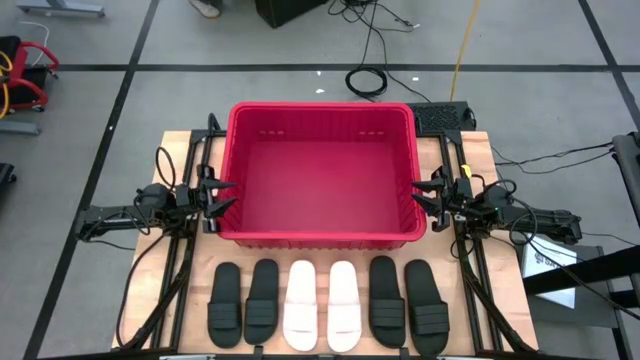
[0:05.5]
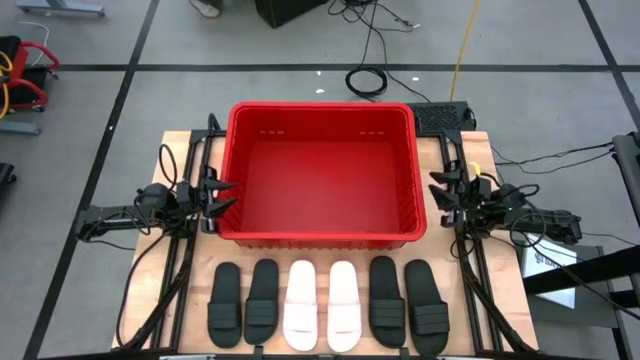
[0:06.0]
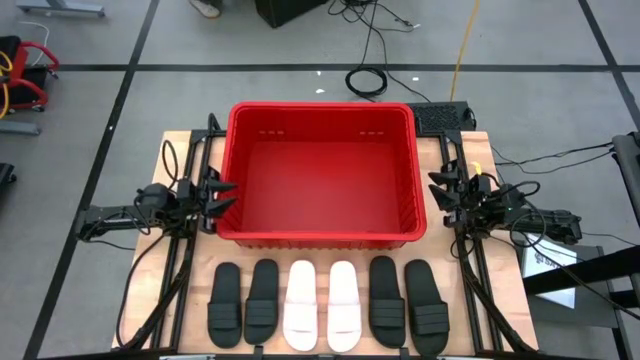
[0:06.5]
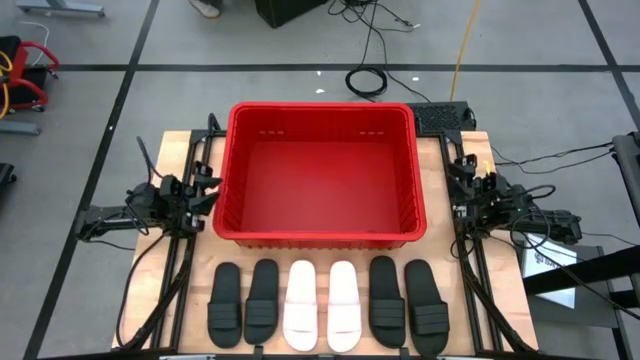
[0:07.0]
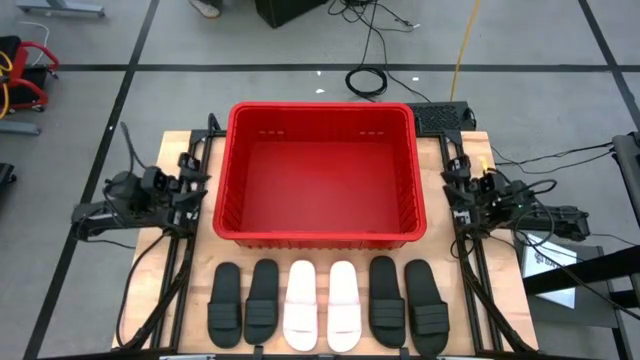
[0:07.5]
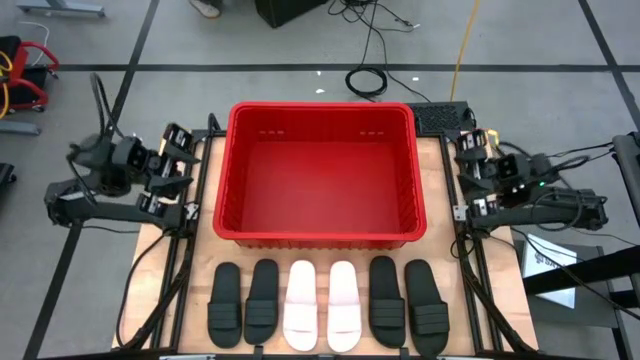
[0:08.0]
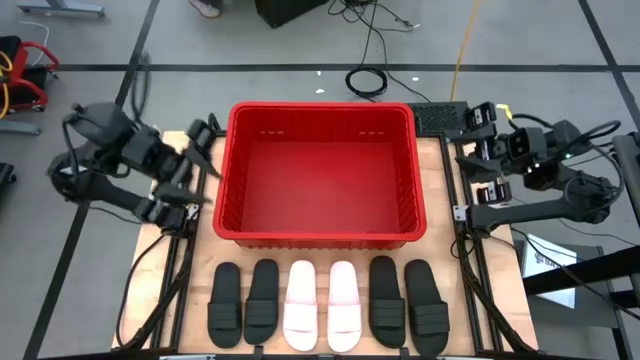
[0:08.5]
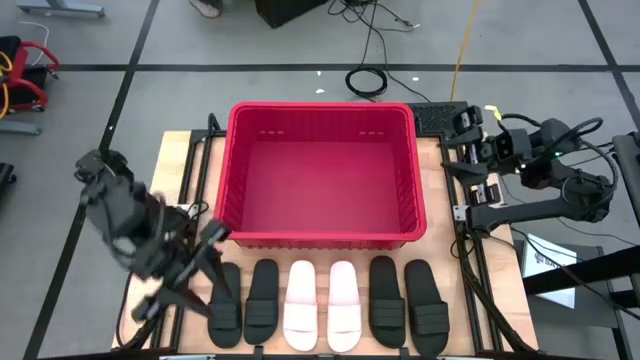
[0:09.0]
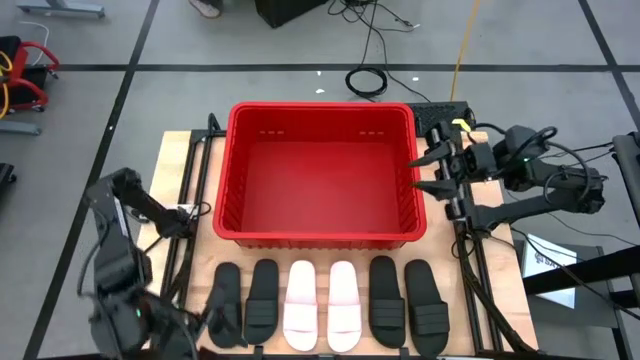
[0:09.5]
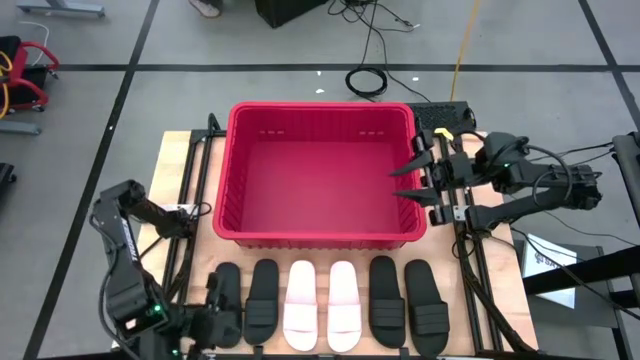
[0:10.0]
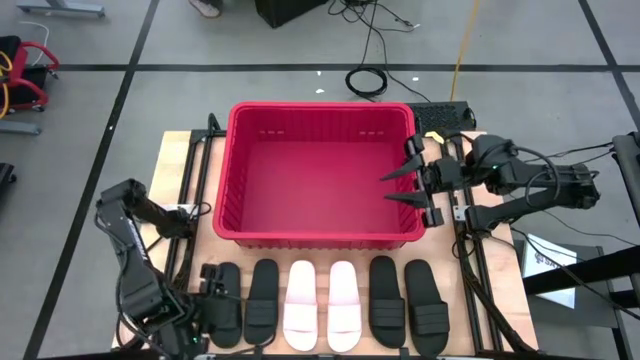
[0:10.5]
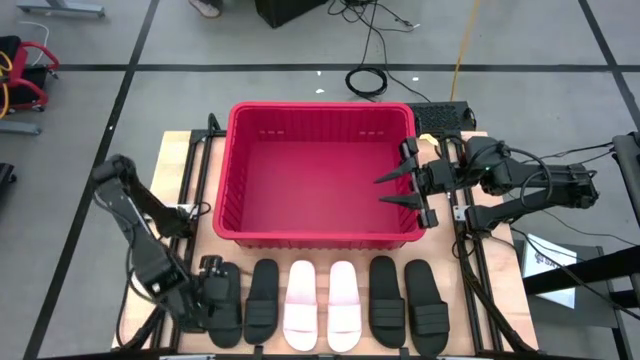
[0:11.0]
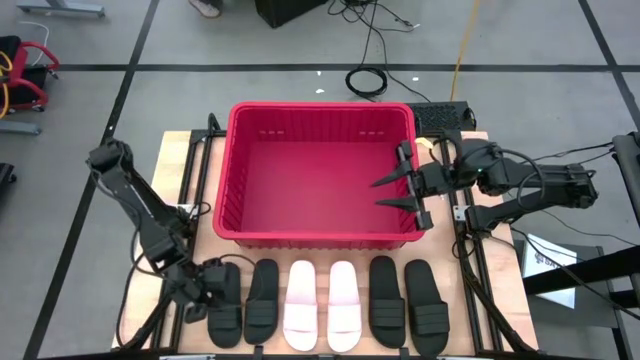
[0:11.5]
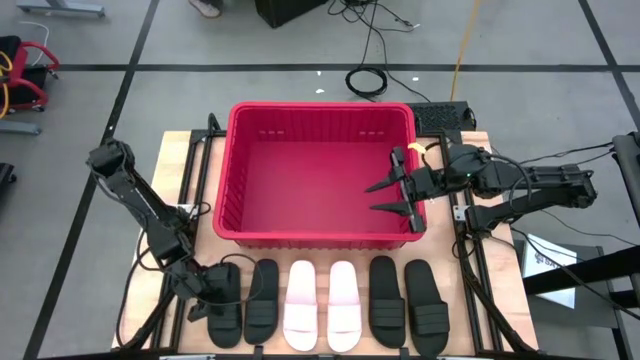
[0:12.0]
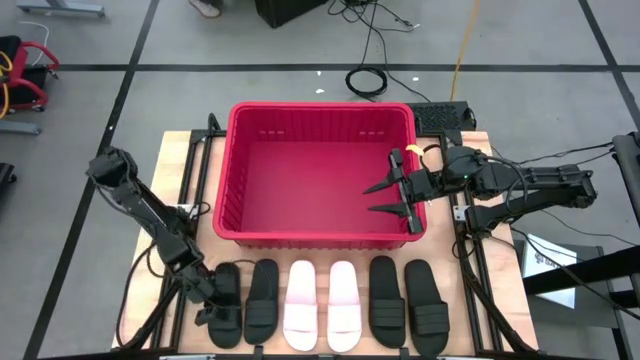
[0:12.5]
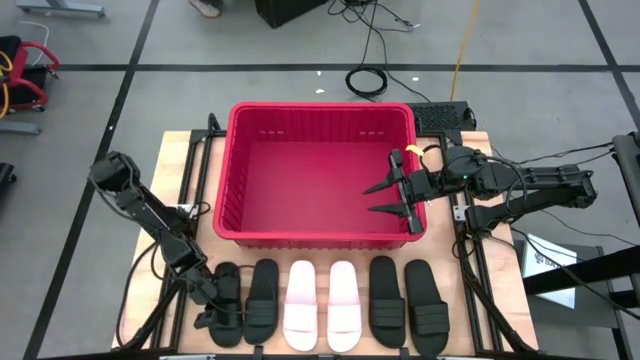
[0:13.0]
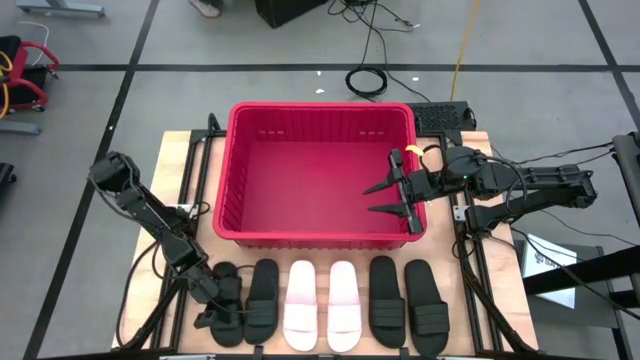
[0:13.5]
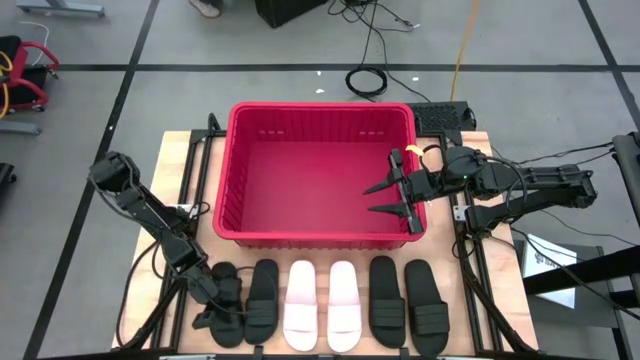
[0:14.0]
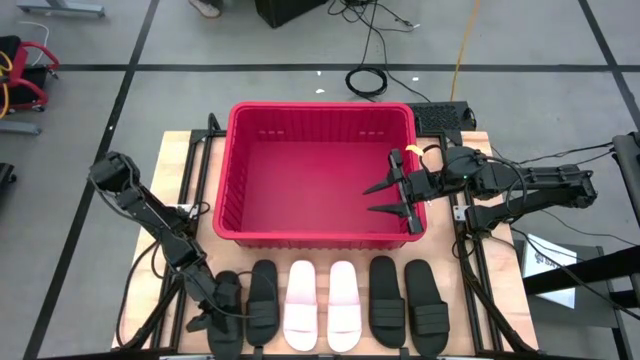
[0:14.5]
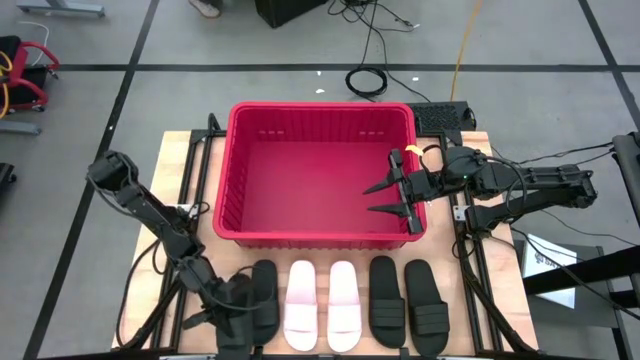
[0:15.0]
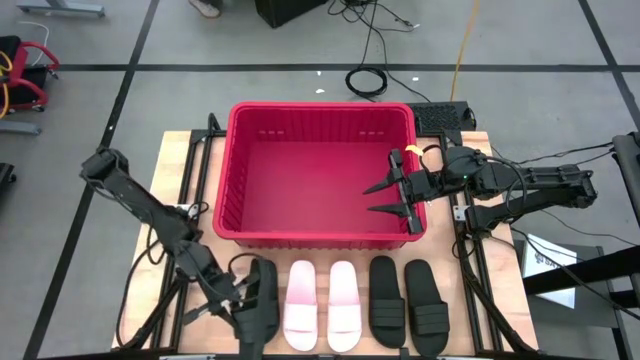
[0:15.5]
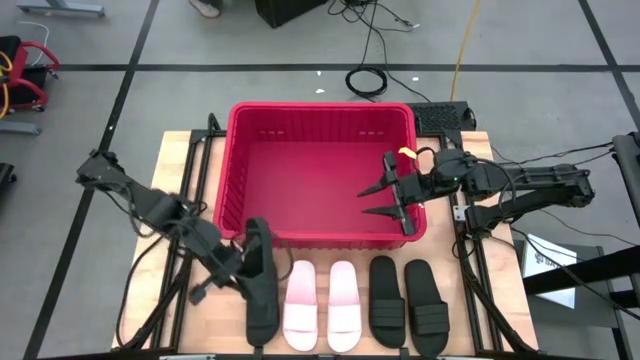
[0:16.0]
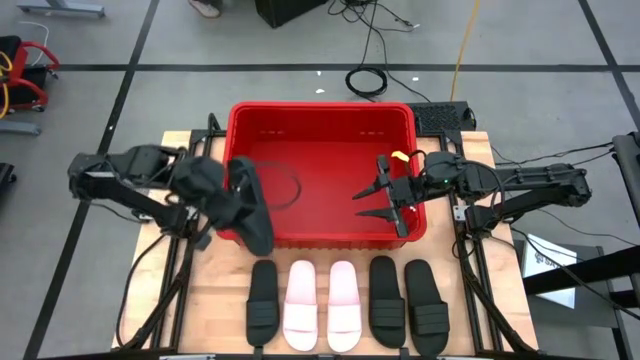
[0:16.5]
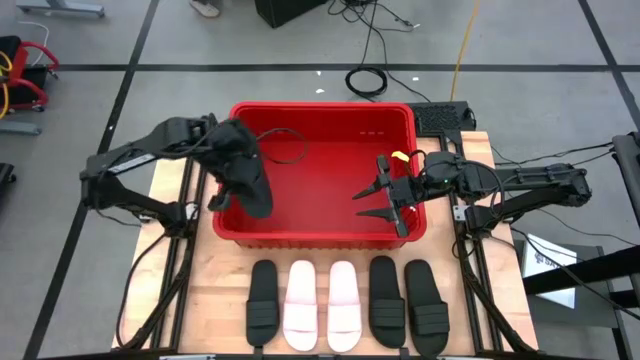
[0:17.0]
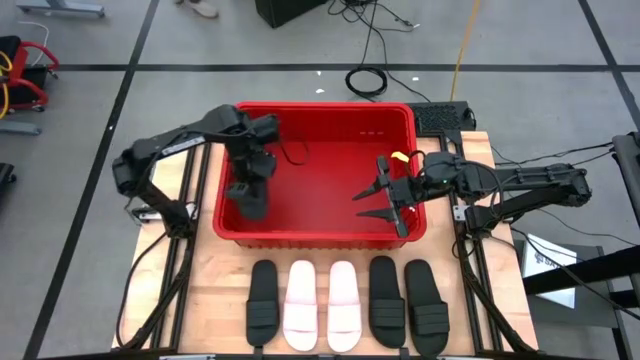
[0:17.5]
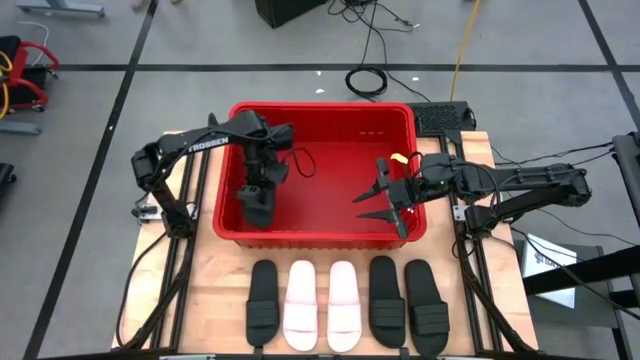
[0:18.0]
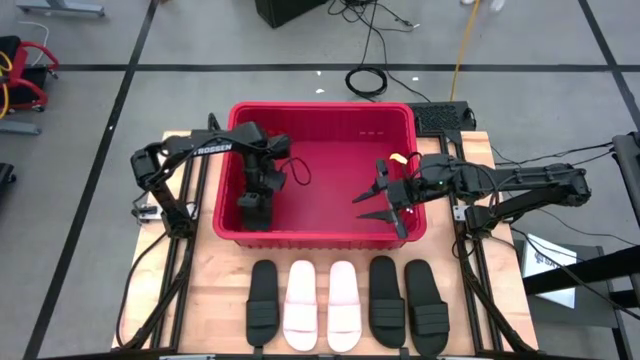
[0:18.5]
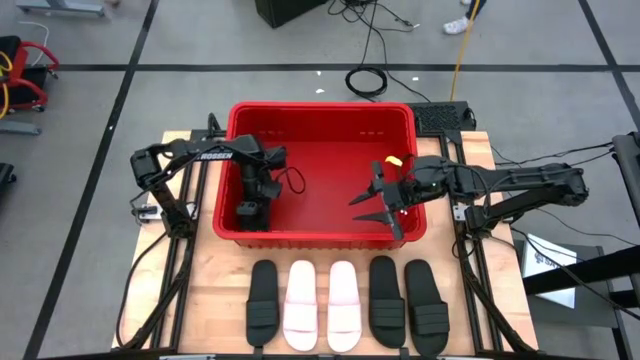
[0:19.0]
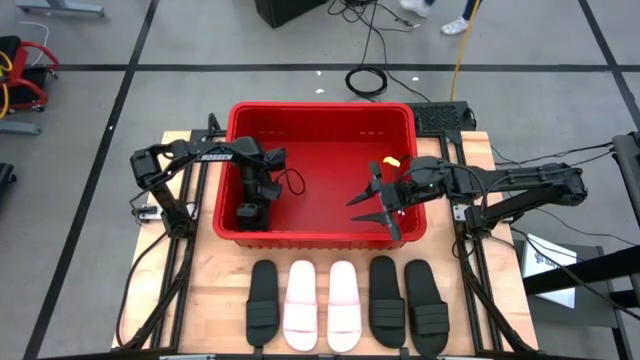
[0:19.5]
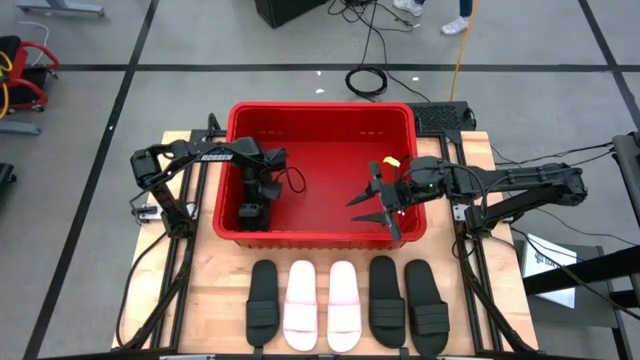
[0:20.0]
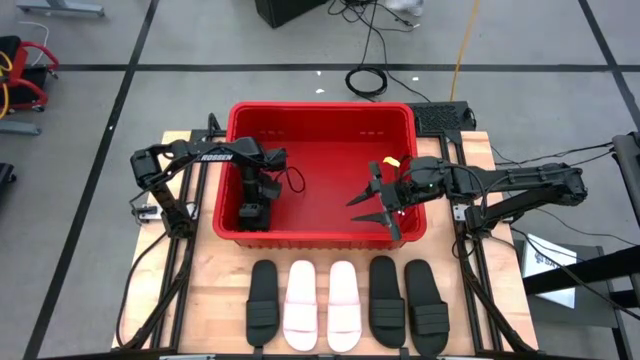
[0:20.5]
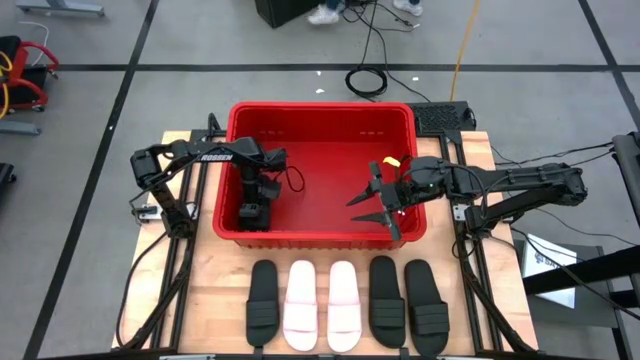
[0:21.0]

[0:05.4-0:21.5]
Task: Pick and place slides into bin
Put the left black slipper into the red bin

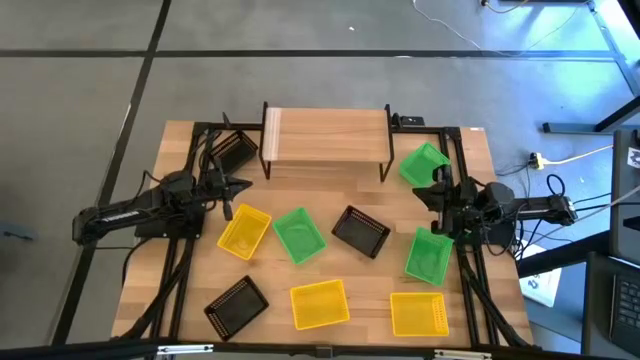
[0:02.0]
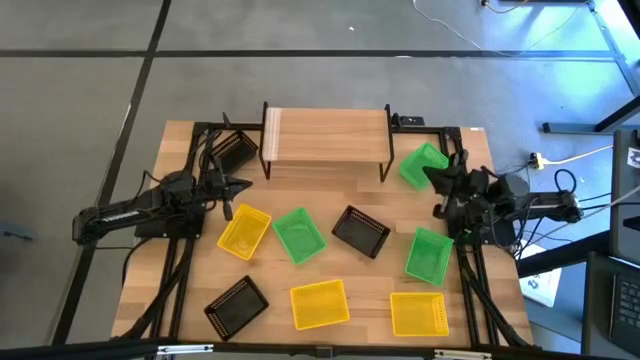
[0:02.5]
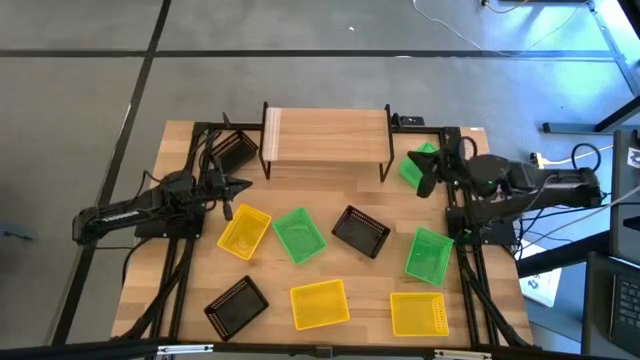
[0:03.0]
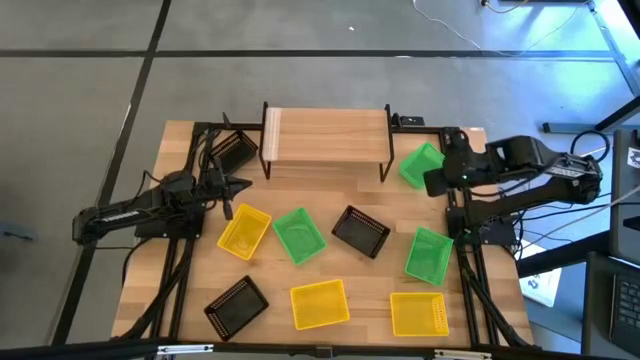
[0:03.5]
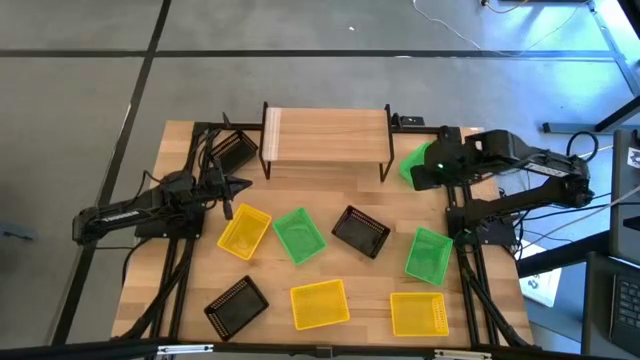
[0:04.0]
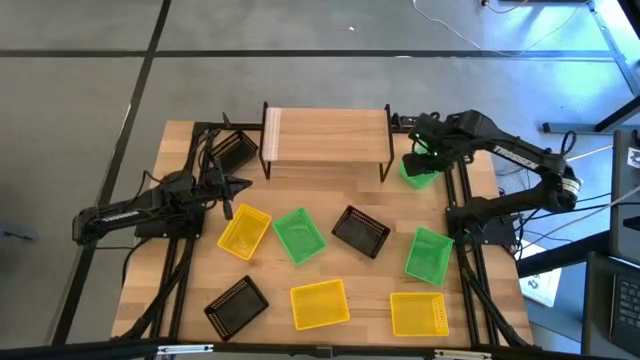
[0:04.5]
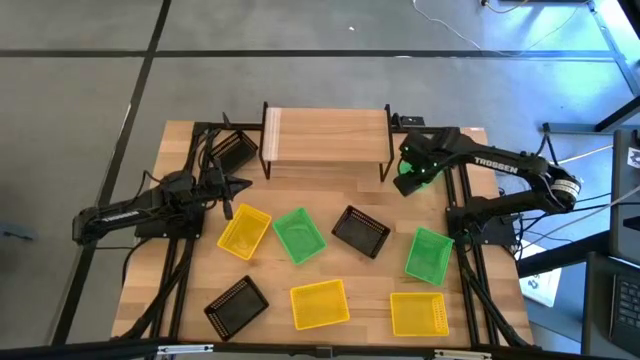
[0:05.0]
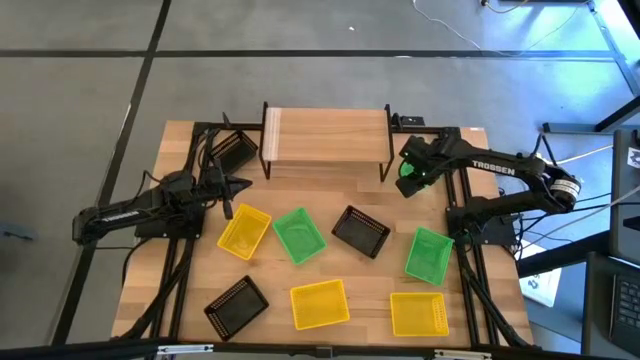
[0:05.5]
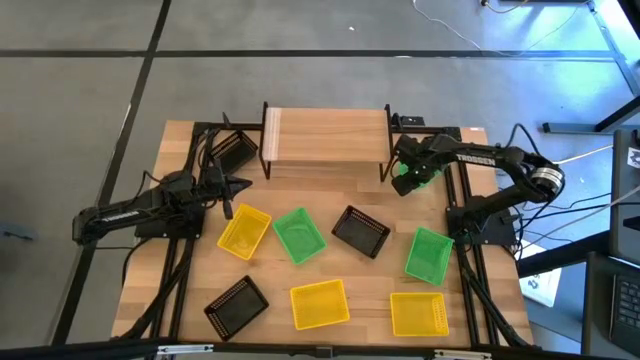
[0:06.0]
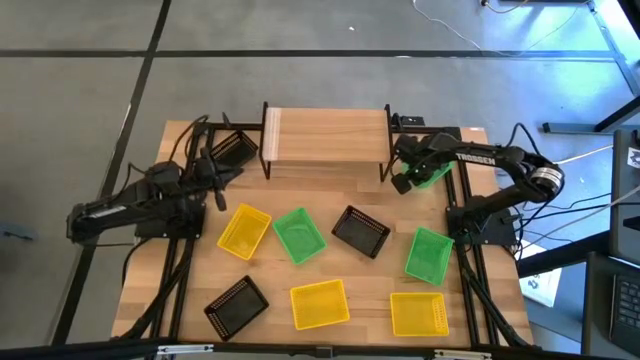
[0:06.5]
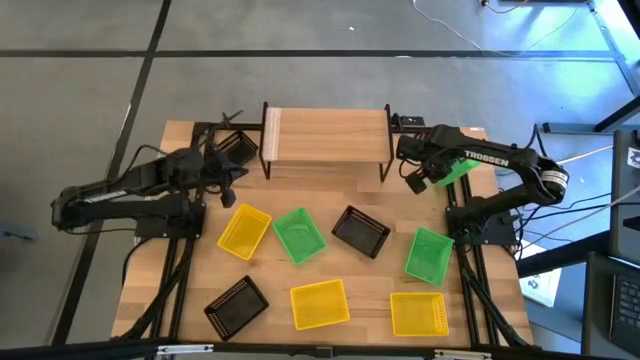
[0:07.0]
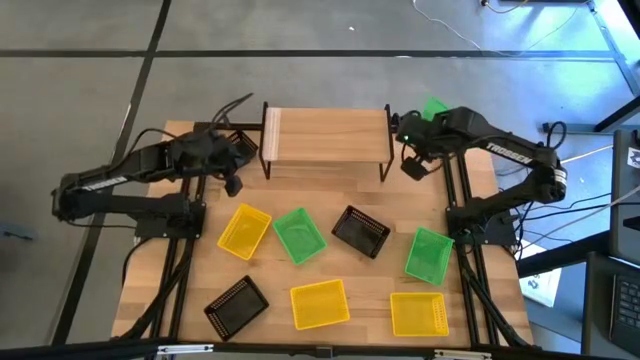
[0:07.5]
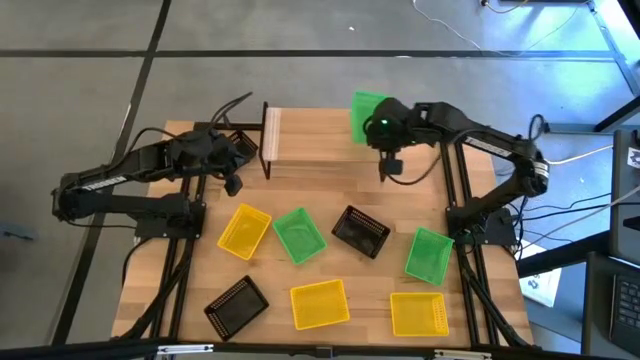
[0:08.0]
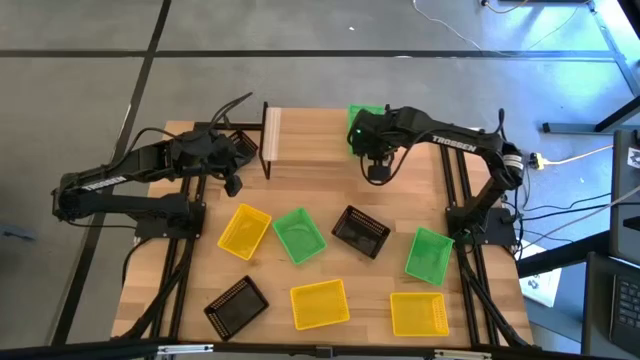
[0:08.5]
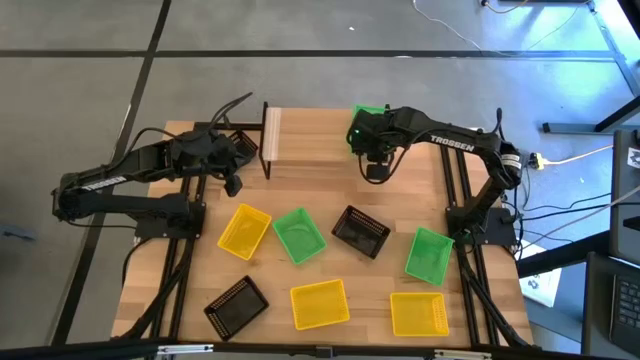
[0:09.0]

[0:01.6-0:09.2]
Task: Stack baskets on shelf by color
Put the top right green bin on the shelf
